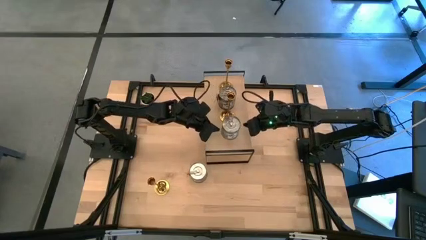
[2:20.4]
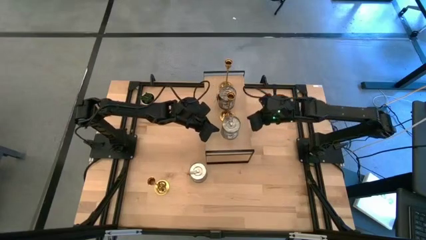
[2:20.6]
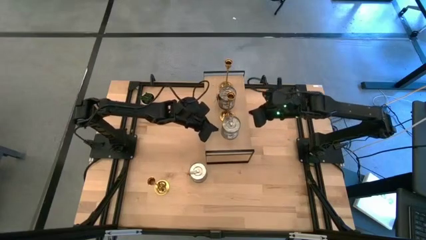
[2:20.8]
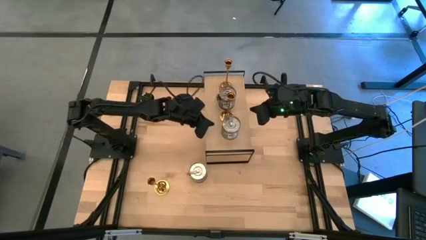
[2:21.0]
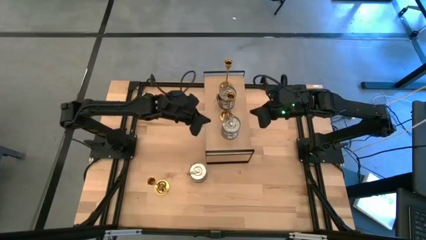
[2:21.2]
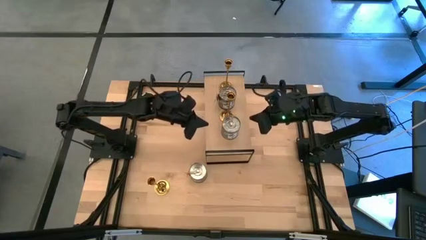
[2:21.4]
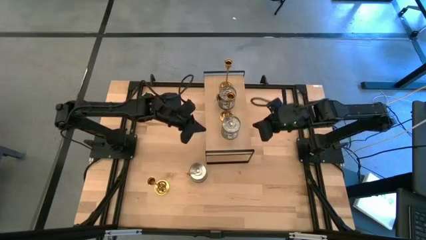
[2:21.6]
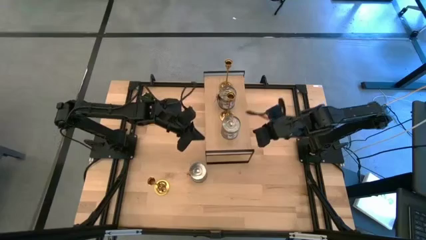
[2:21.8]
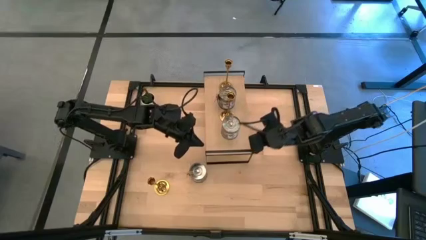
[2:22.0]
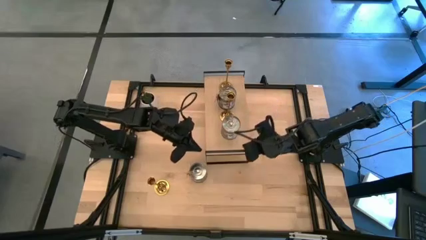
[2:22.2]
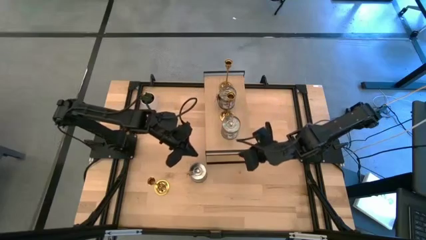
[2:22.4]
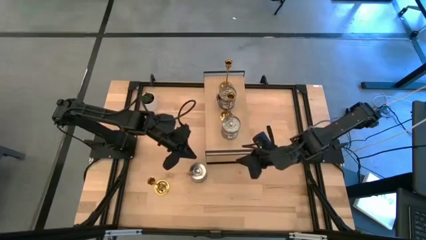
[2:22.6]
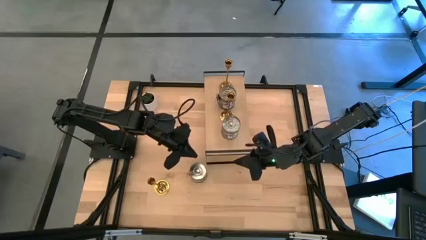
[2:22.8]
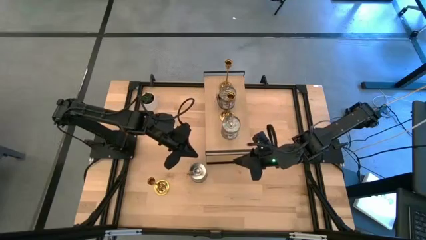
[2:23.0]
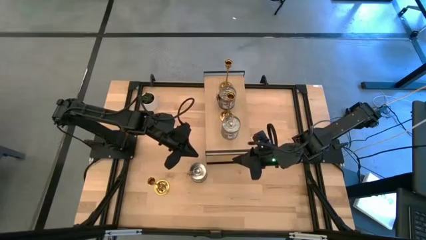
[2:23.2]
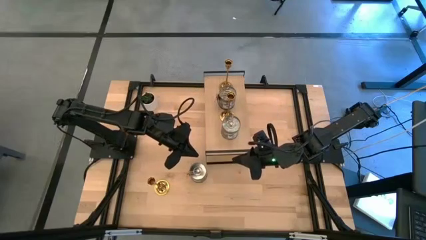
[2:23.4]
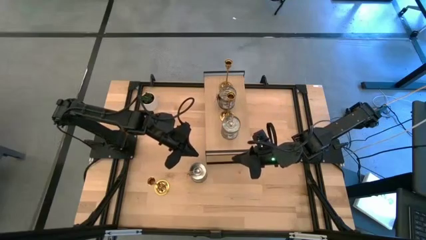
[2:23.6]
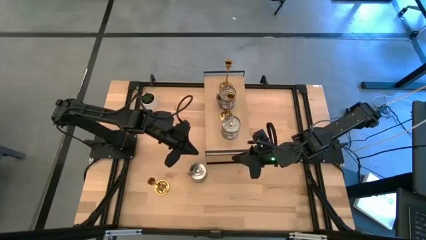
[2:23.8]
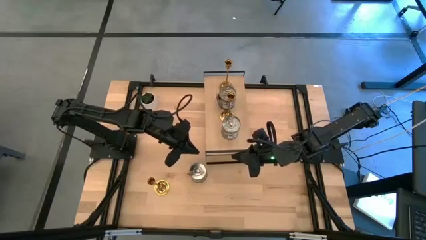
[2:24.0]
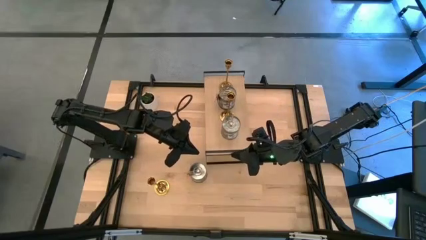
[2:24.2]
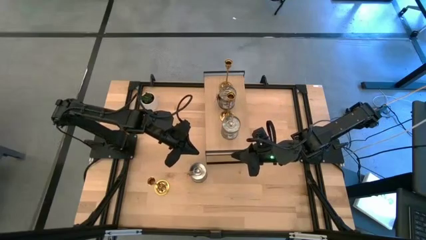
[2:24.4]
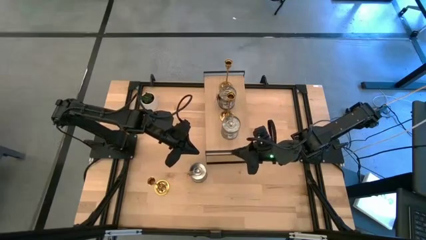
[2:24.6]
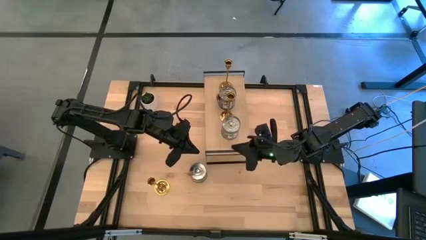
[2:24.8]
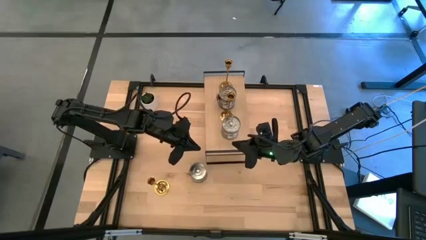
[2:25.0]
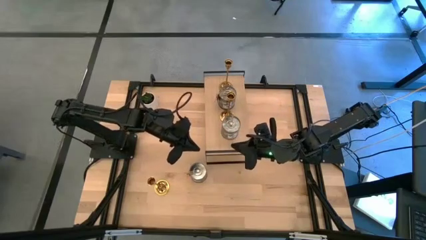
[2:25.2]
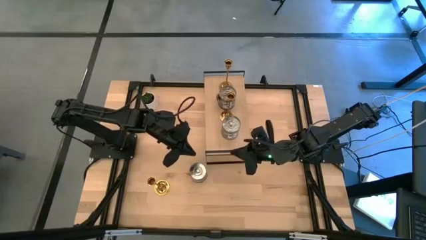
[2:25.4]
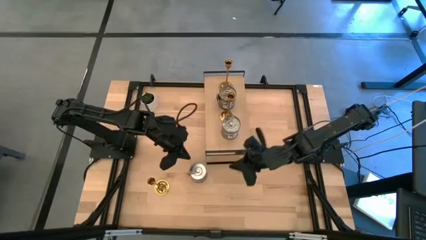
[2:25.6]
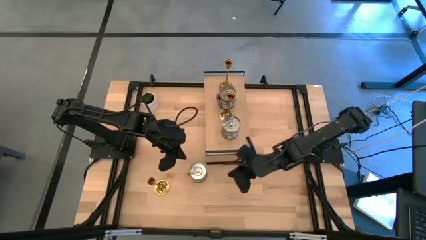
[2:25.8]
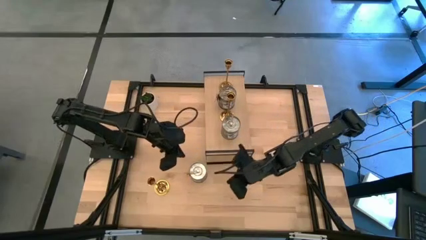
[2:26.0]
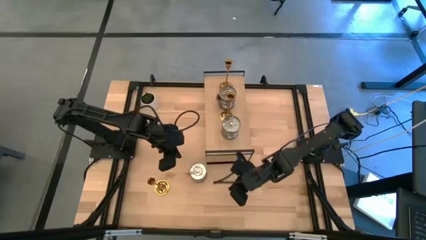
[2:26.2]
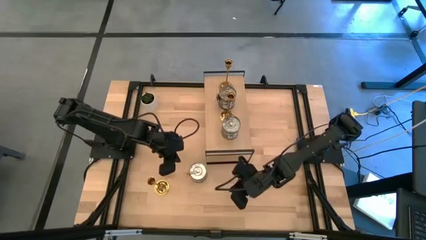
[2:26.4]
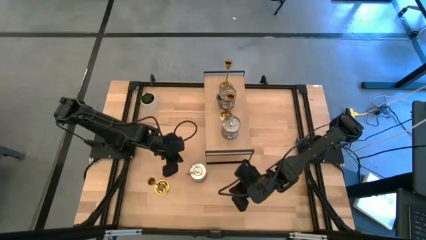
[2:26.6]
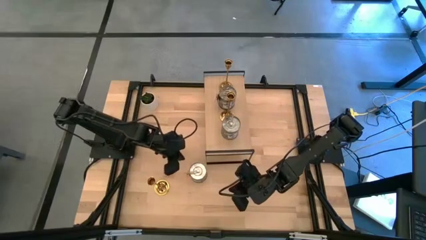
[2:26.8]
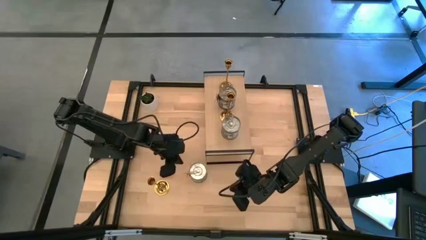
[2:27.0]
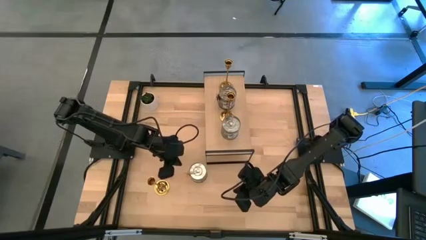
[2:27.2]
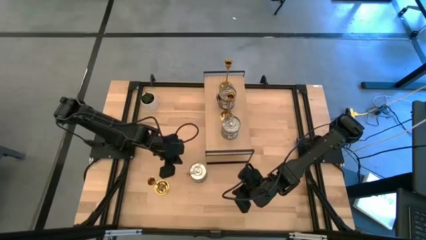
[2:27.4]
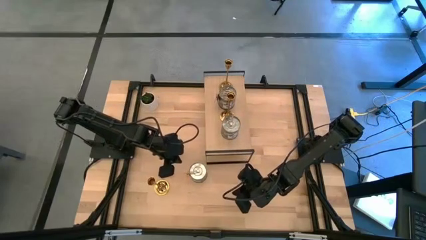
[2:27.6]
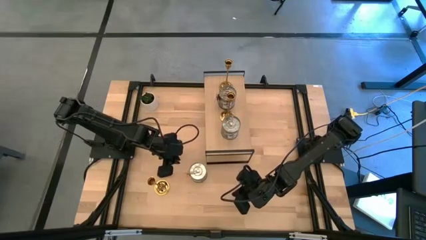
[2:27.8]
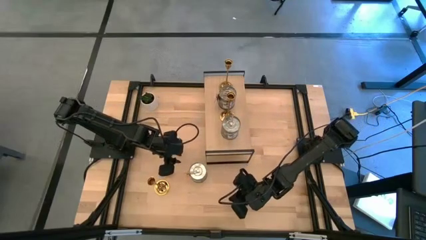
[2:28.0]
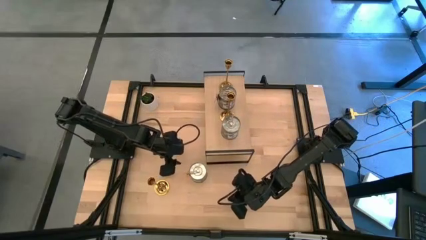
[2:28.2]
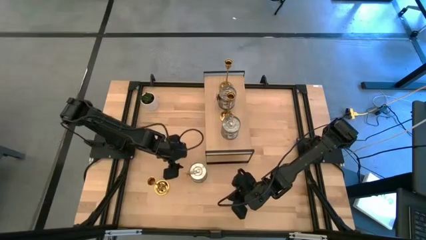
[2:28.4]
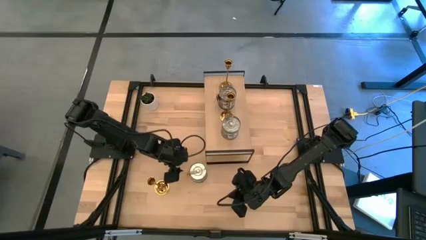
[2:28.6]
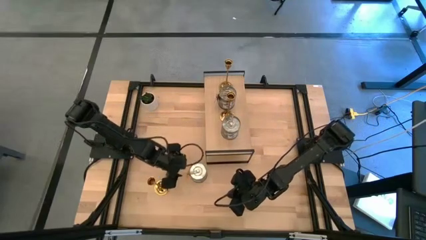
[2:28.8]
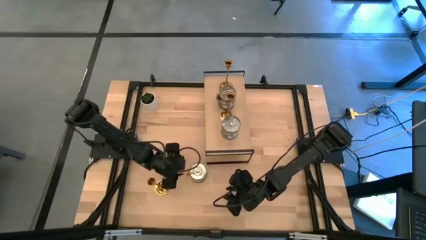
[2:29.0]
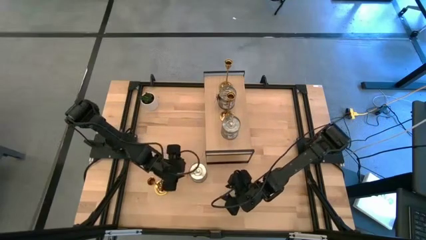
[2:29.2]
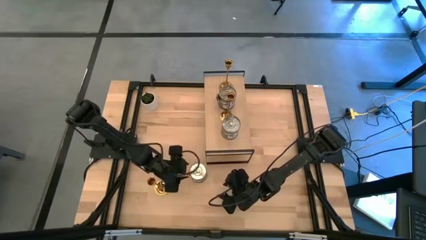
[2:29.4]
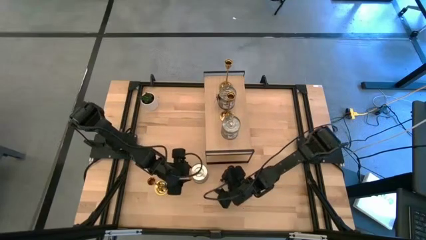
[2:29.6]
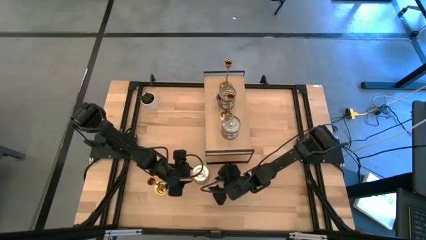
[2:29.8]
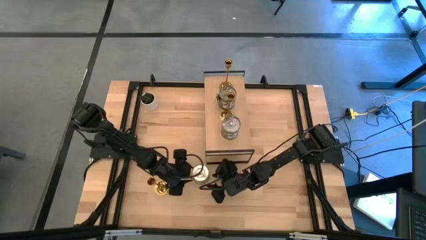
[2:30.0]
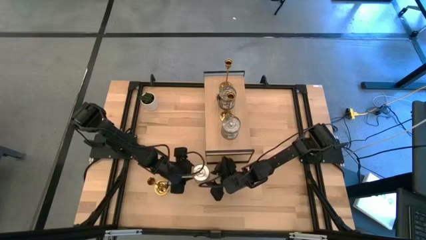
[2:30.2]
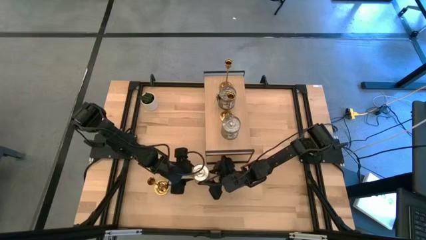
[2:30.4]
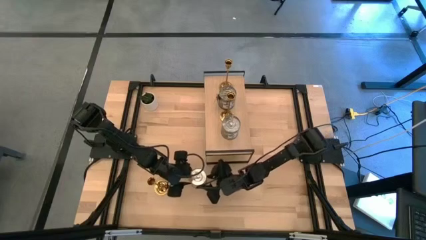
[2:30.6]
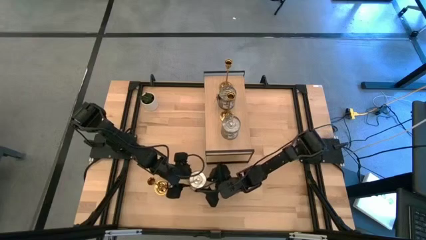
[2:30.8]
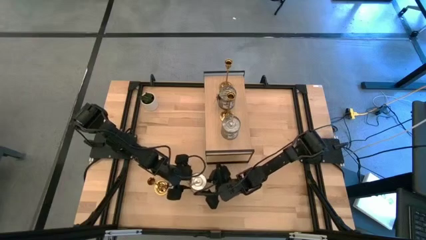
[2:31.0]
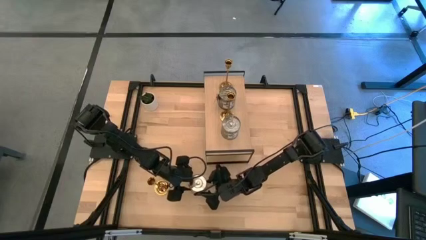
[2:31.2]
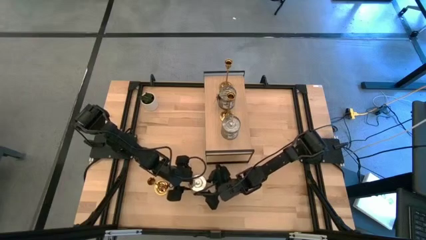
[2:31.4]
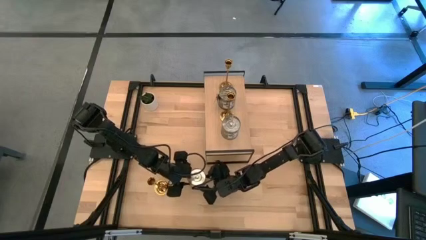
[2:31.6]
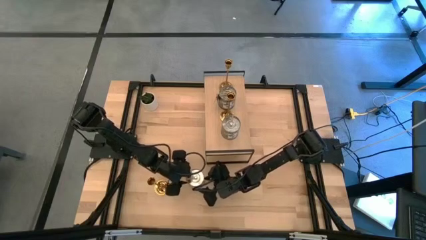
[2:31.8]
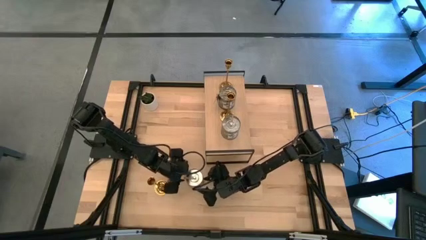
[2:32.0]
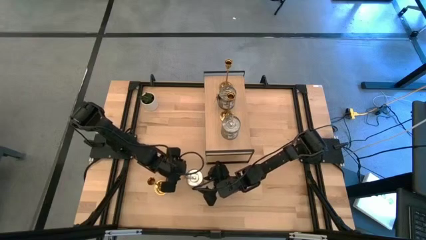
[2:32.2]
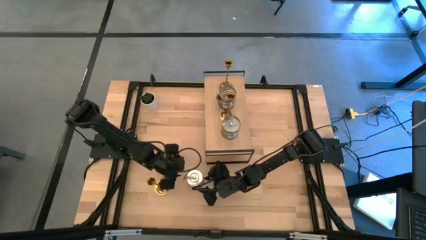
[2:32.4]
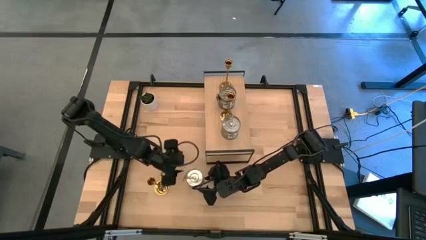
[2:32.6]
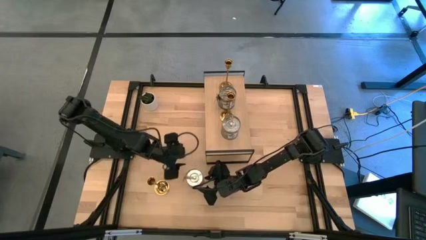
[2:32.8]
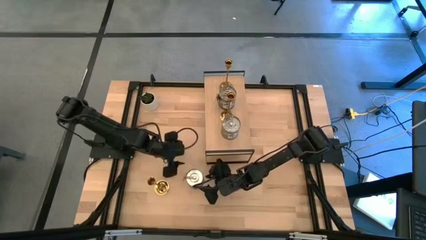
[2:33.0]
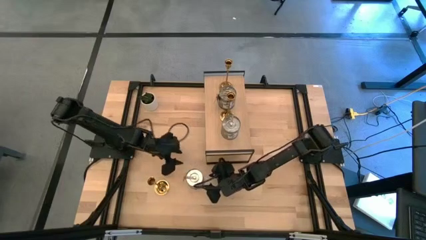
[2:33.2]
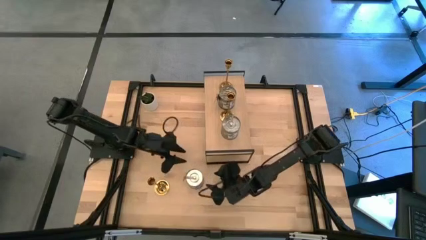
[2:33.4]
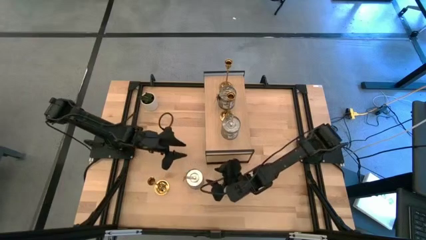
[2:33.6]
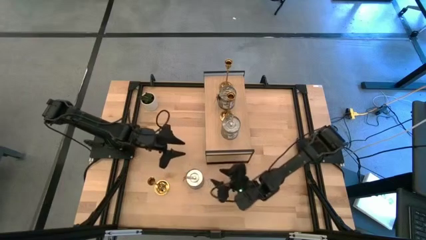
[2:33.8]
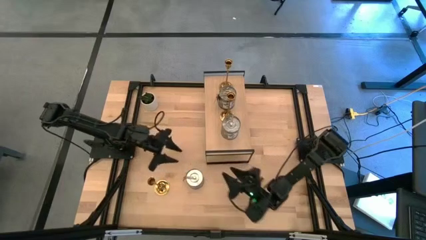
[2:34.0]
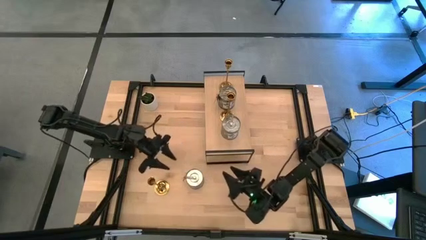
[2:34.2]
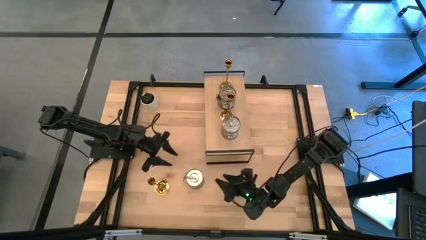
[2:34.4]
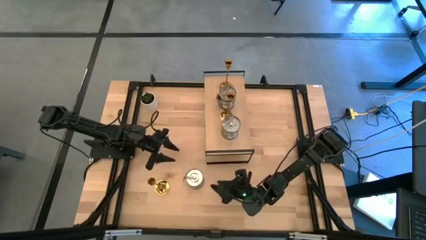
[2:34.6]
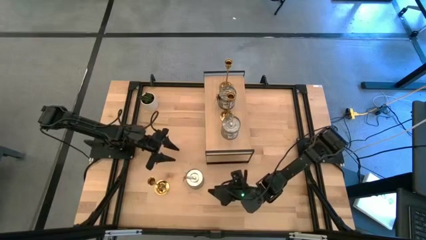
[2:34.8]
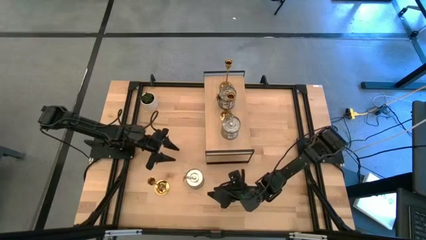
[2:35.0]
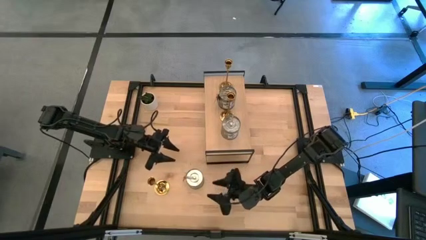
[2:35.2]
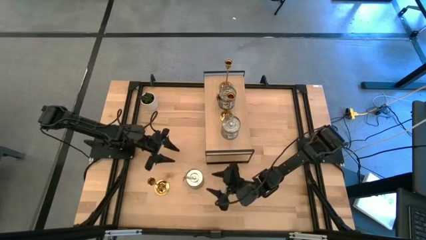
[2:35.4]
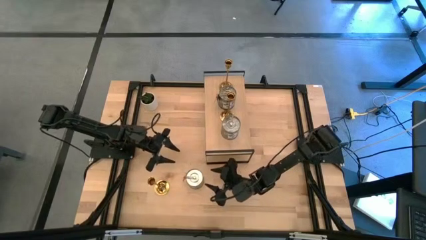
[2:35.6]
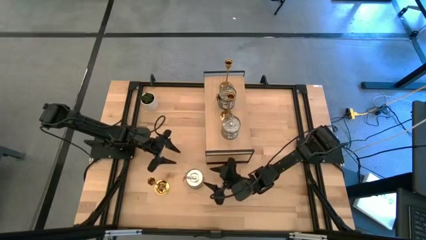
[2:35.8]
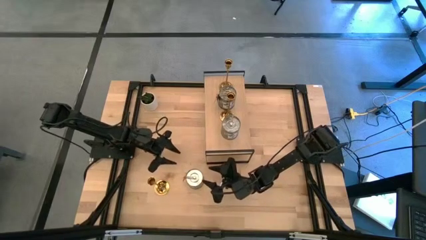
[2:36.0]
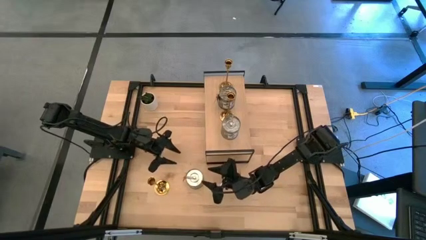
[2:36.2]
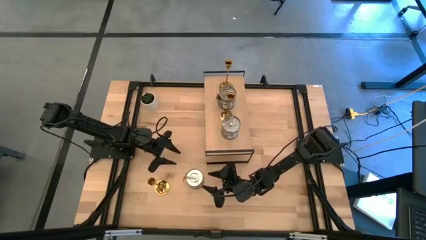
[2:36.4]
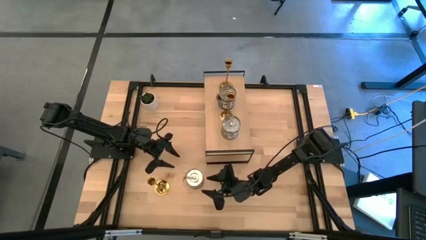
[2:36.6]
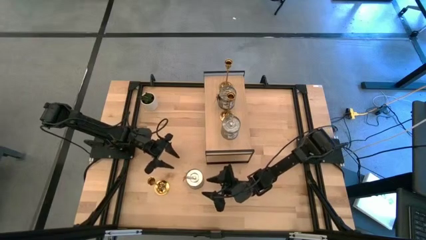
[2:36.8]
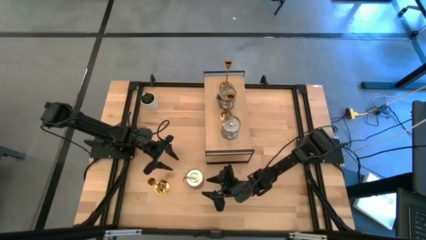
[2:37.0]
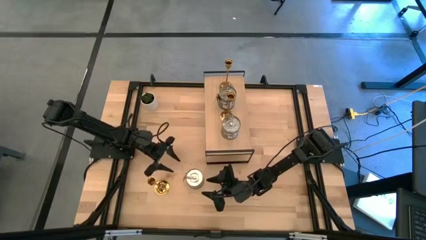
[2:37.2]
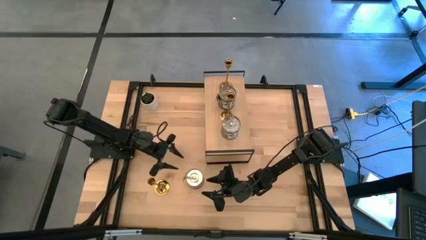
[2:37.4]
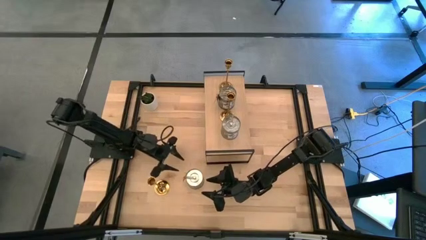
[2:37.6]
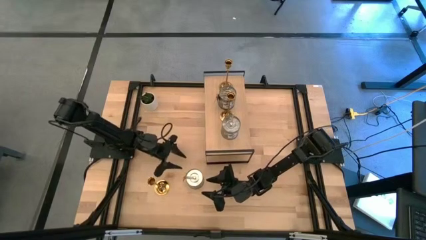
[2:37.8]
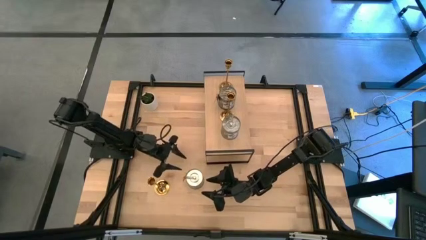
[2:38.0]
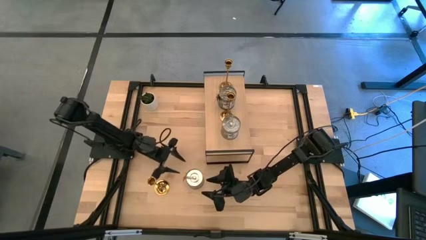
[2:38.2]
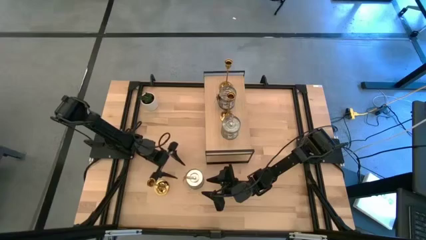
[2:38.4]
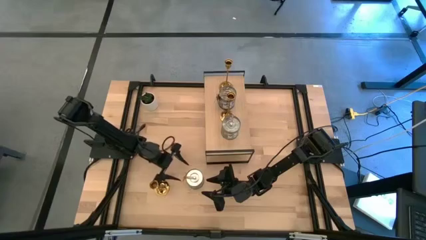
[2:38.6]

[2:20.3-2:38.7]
Task: Pick & Place candle stick holders
Put the silver scented candle on the shelf
